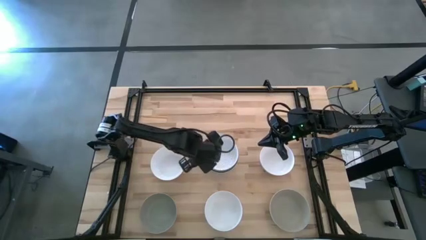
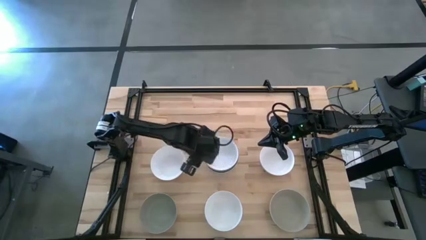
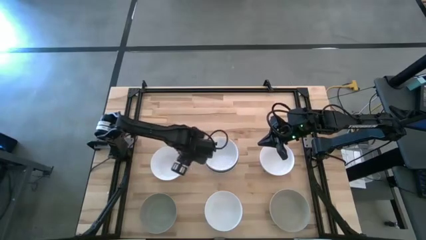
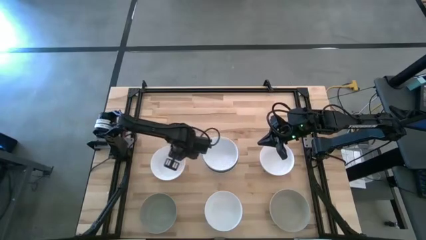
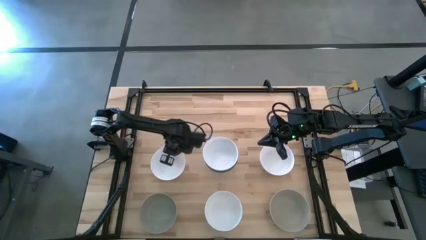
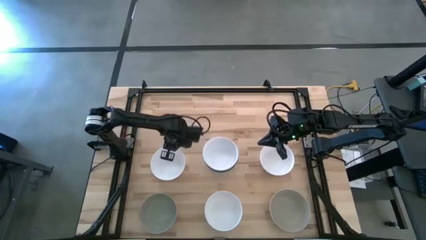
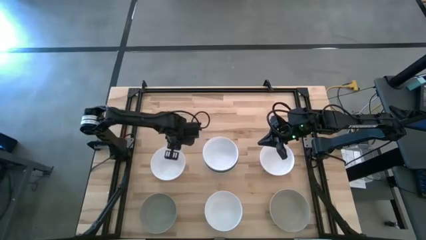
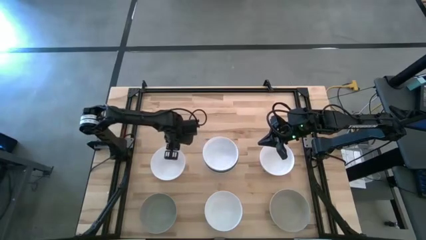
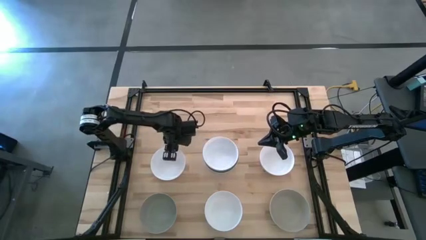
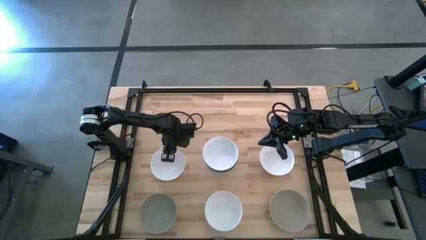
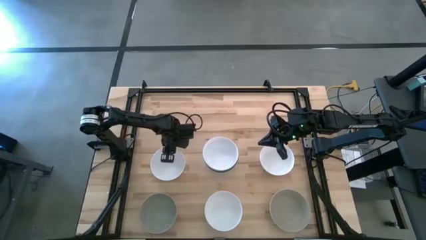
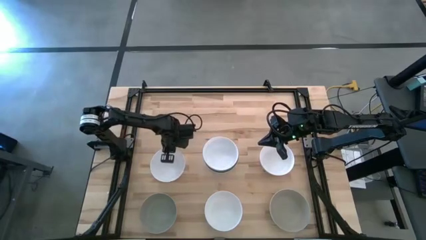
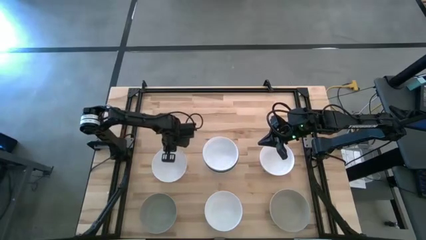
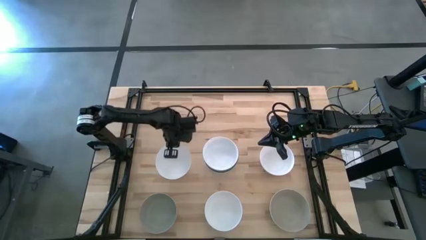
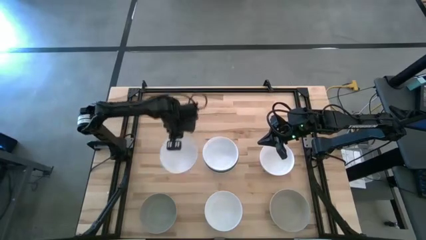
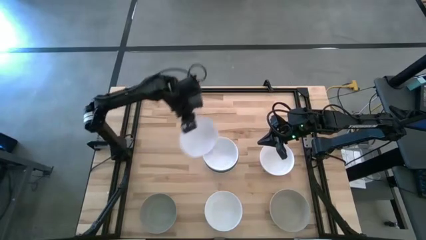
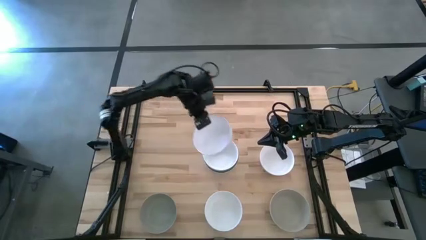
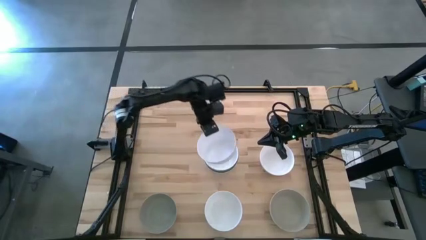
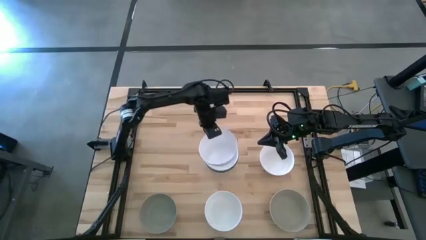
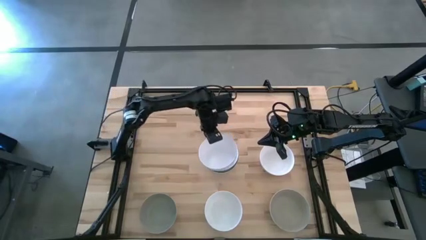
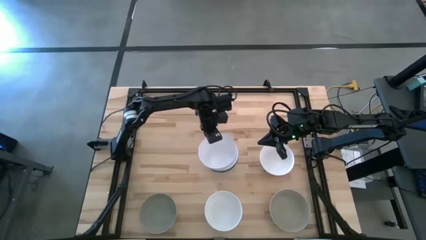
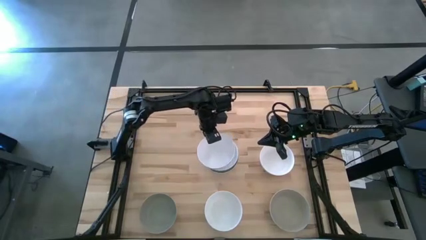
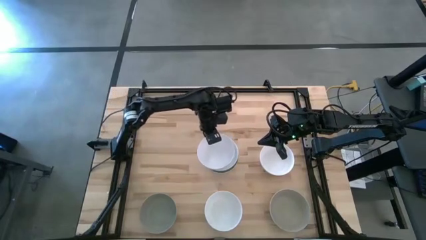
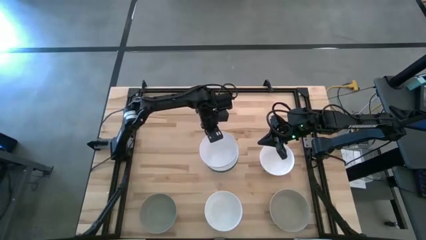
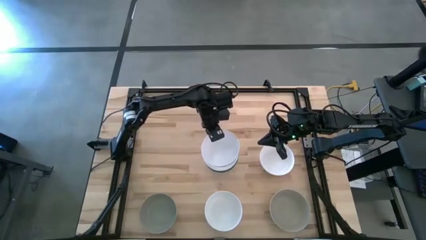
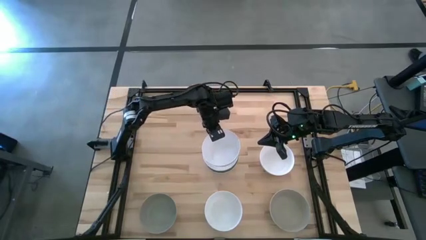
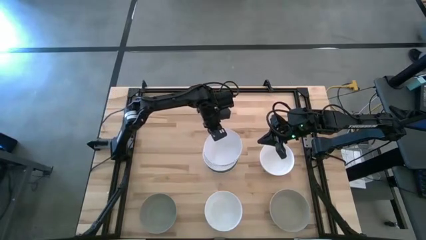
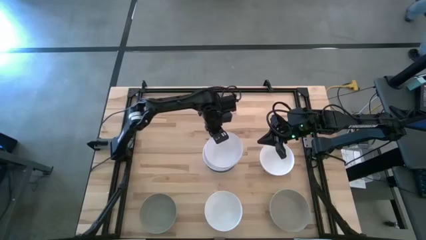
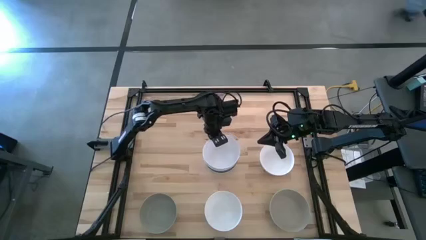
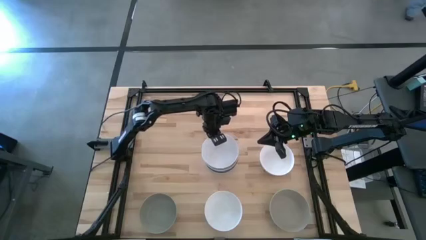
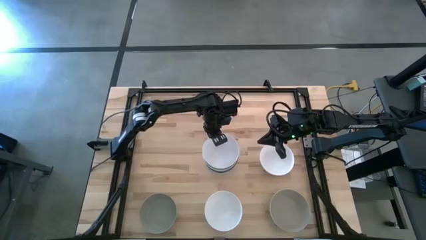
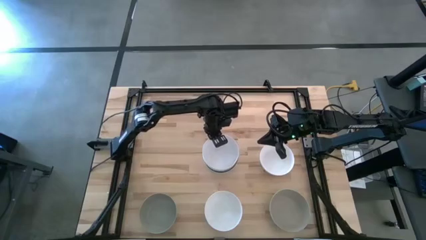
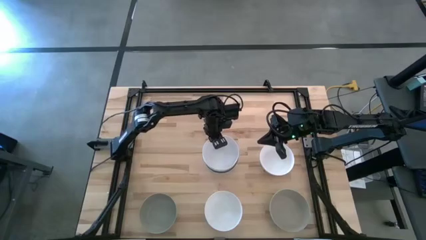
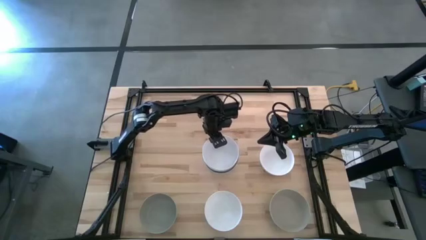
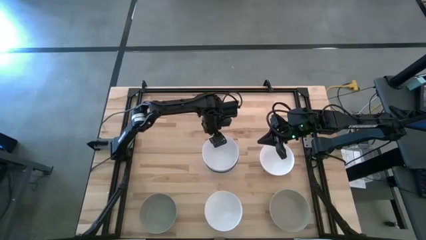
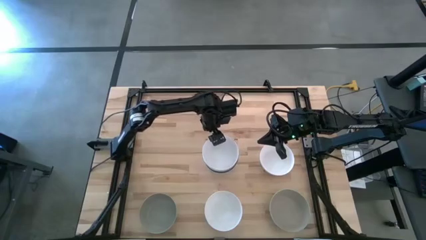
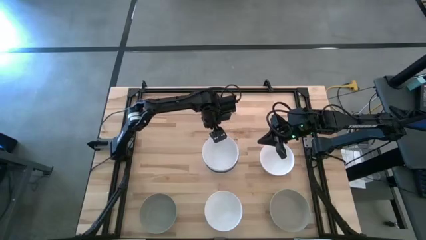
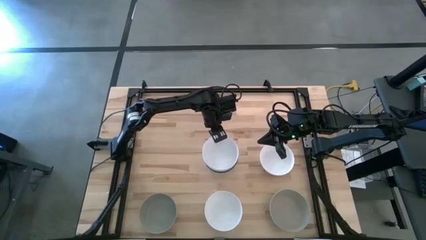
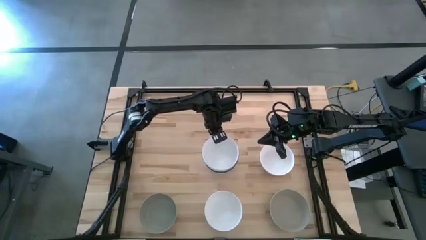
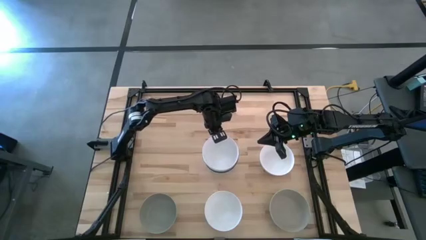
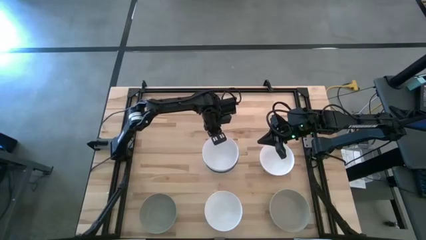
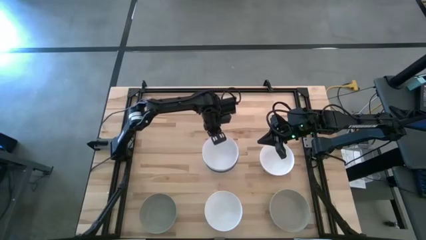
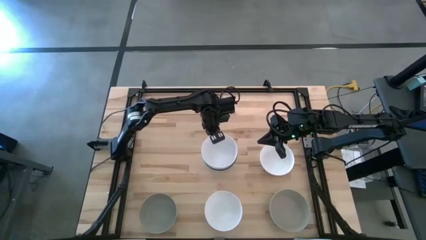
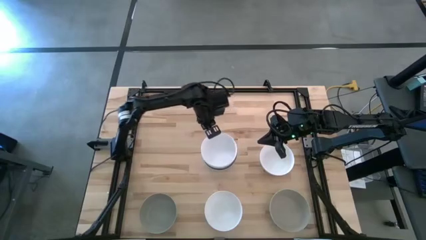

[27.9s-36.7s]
Task: Nest bowls inside each other
Stack the white bowl on the other white bowl

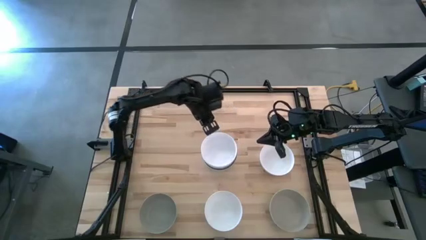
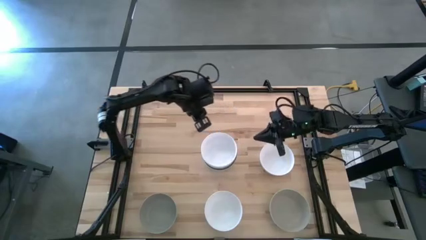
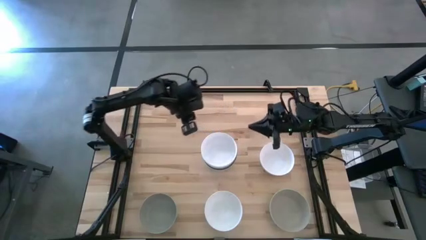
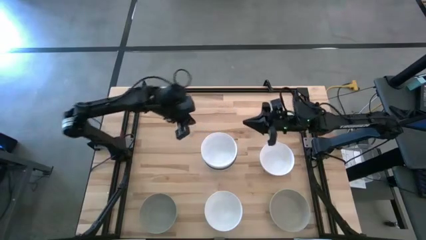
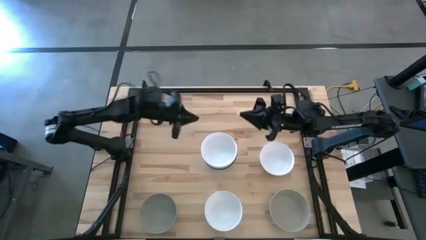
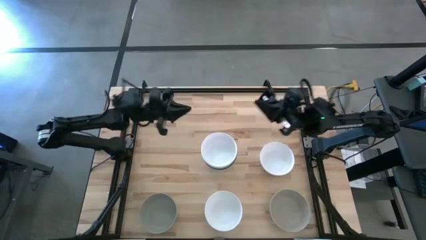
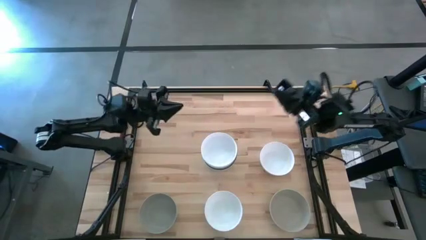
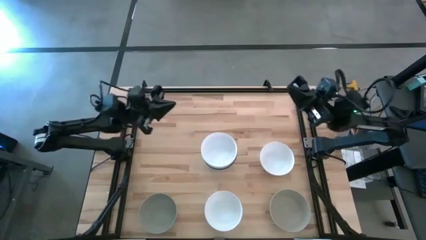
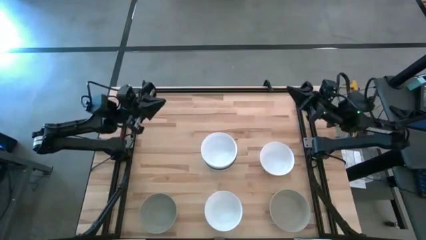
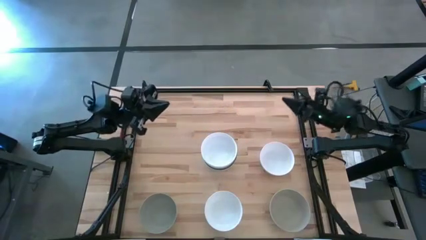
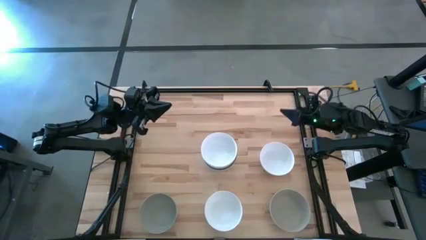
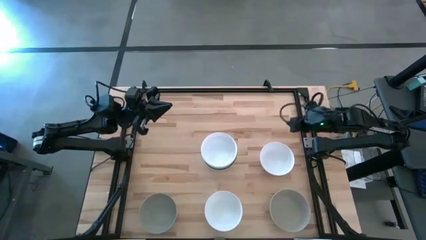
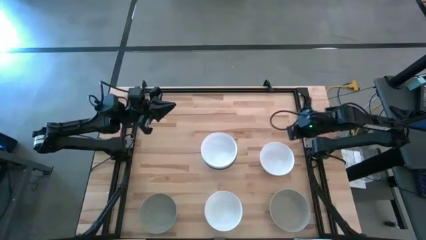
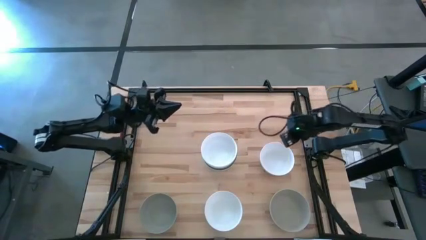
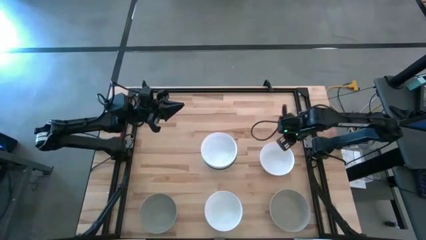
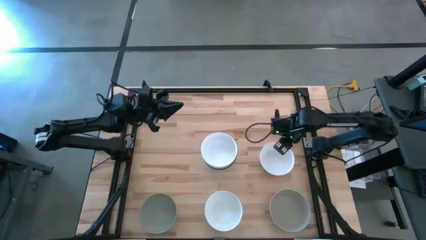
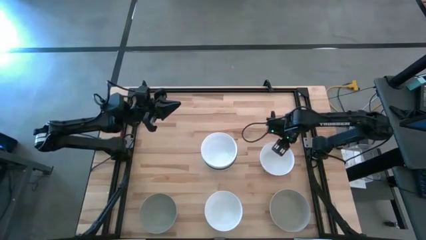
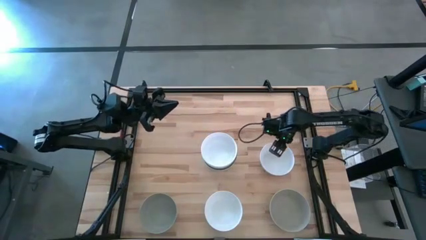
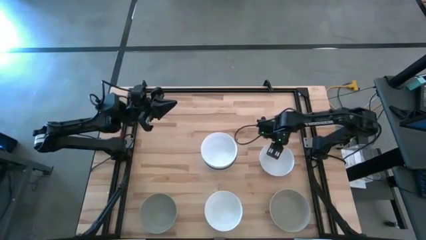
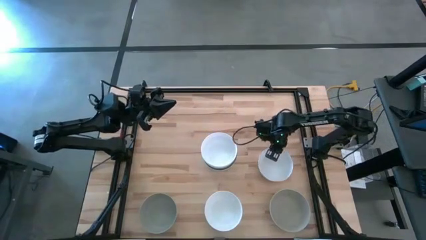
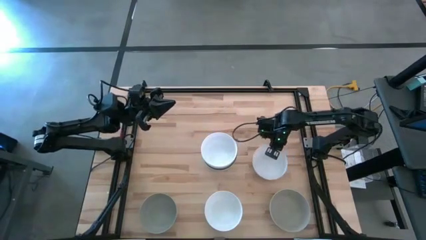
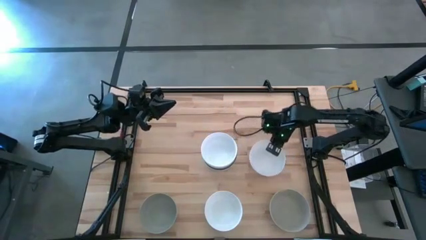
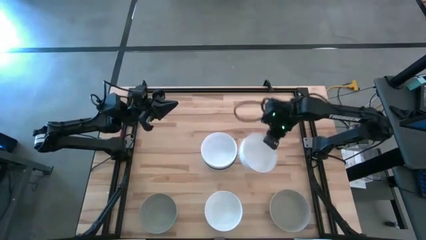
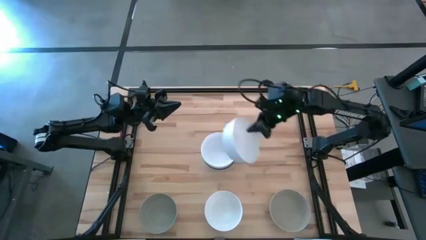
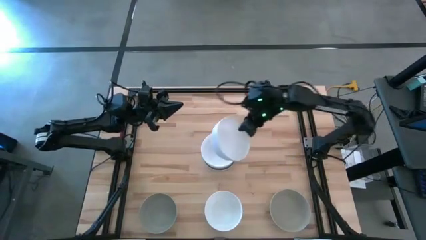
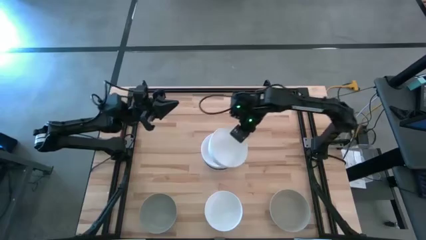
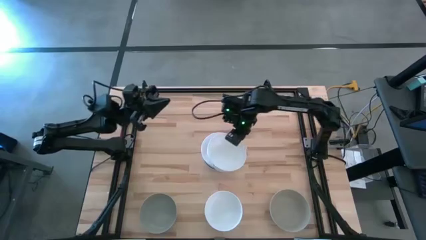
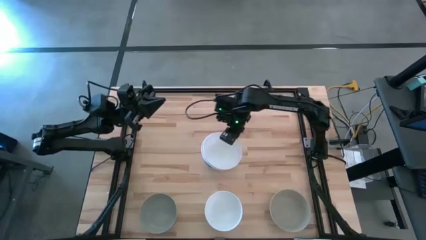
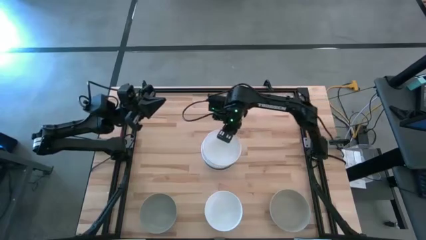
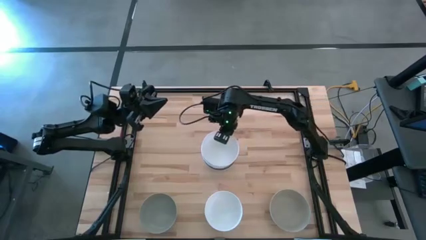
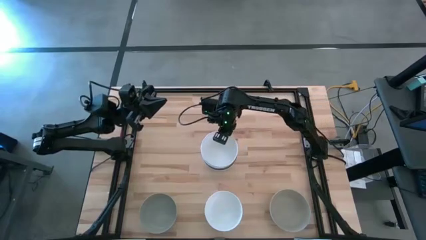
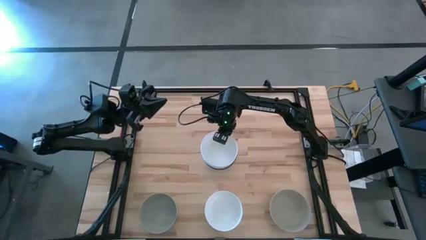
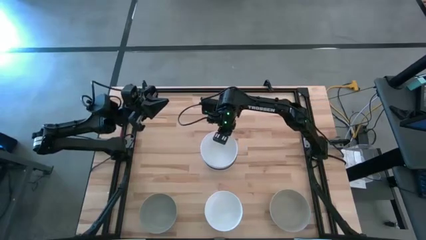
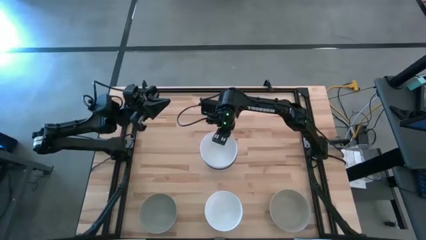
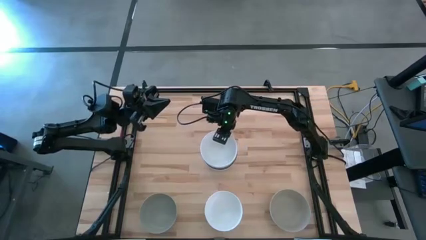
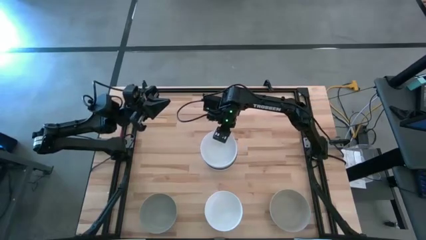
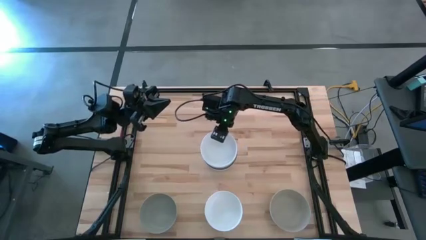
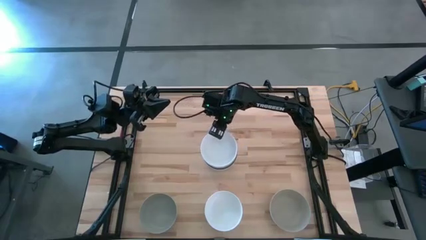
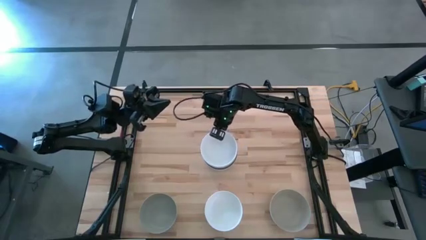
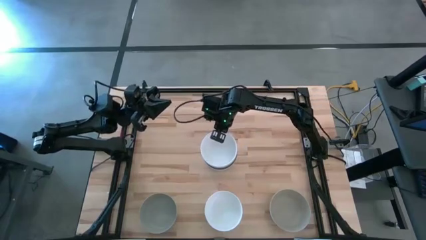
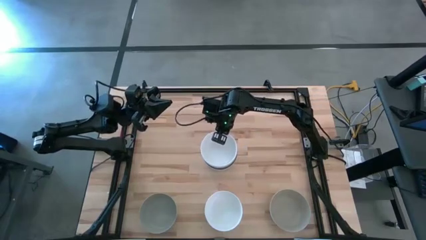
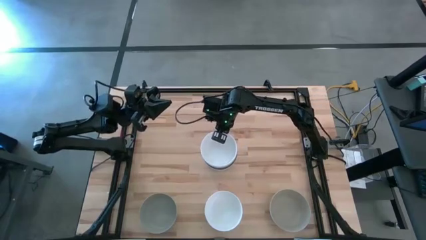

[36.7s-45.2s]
Stack the white bowl on the other white bowl
